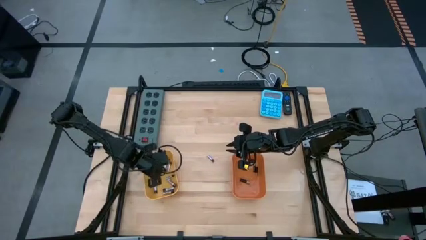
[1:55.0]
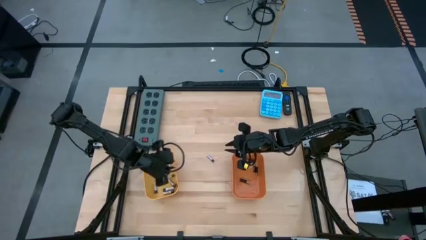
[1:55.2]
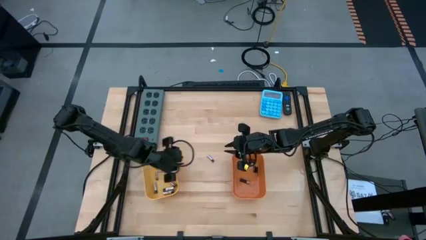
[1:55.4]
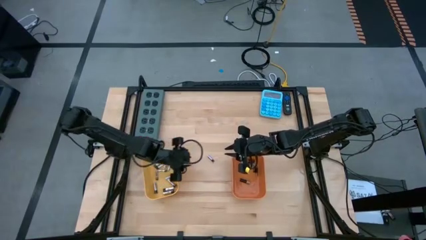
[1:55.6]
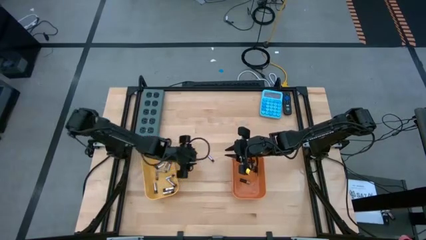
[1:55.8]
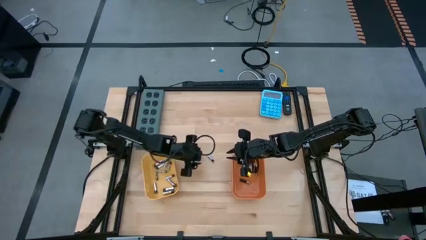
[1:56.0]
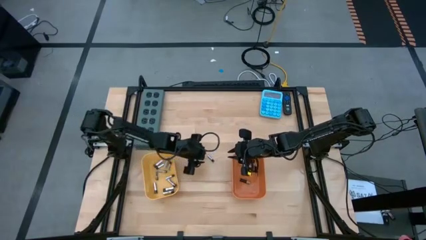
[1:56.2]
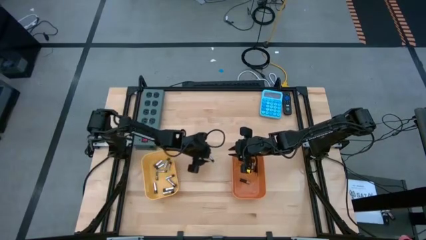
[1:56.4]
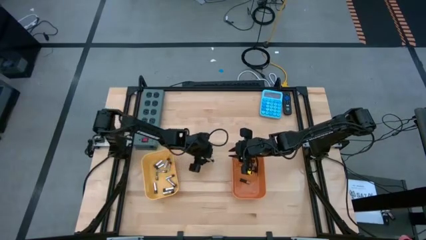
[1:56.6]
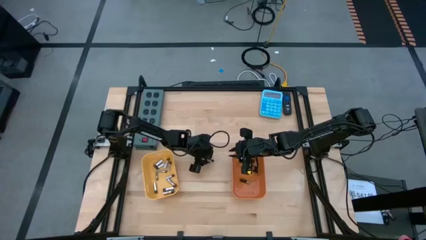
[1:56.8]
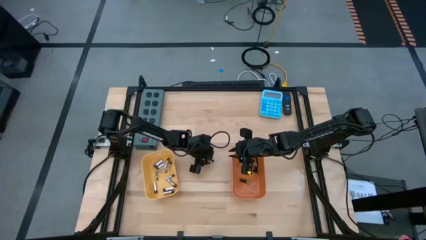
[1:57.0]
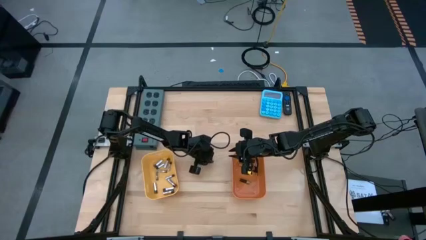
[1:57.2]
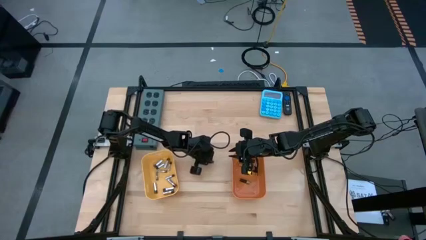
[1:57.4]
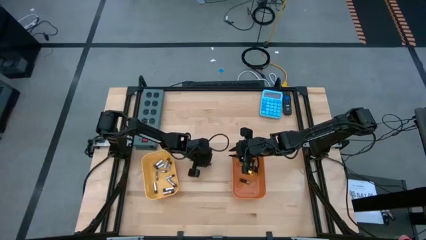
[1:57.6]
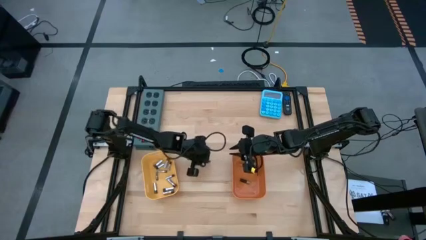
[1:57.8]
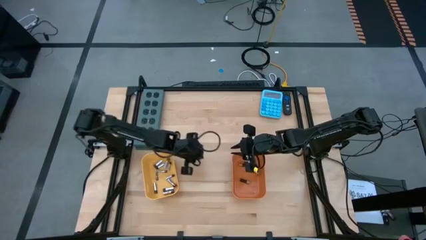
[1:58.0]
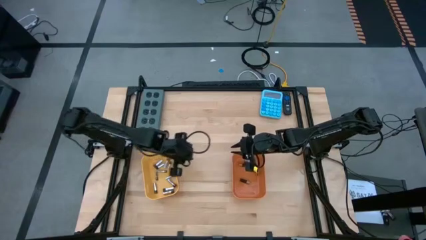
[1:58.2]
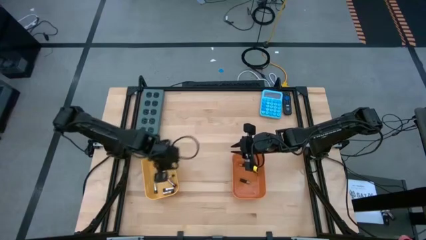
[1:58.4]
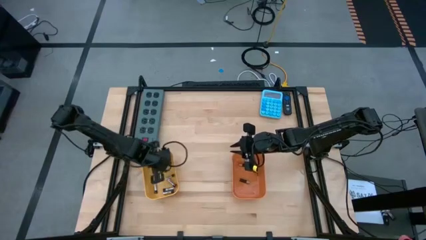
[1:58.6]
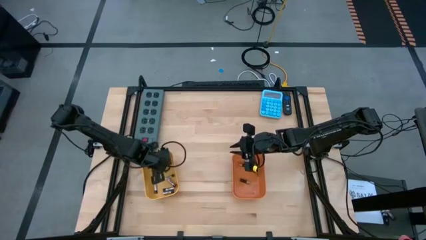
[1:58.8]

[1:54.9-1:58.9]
Task: Sort batteries
Put the silver battery into the yellow bin

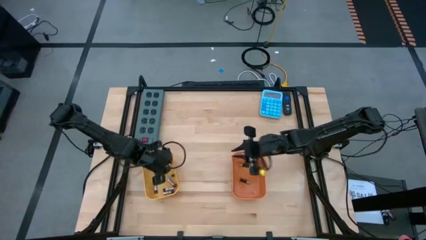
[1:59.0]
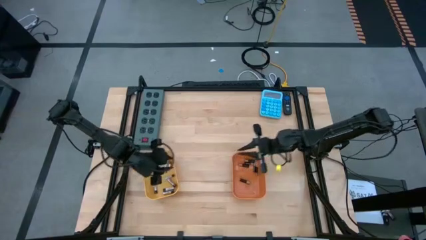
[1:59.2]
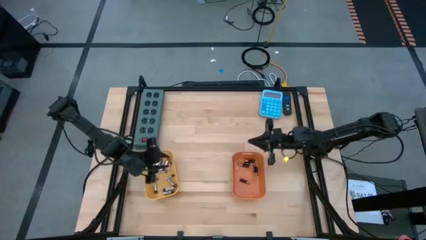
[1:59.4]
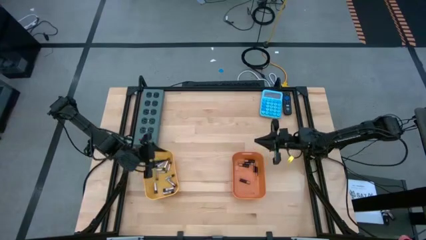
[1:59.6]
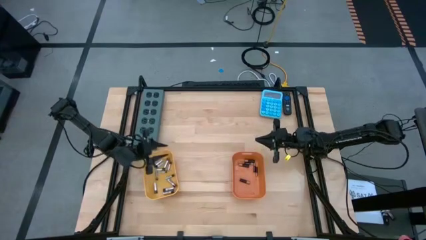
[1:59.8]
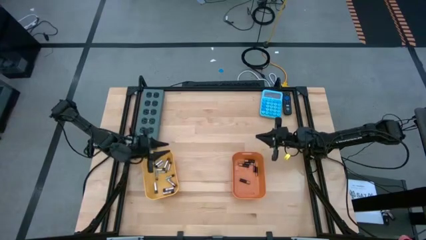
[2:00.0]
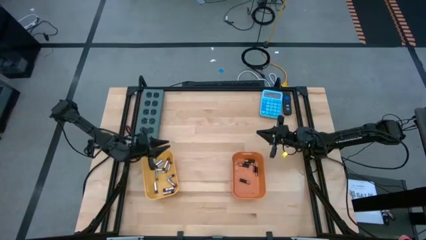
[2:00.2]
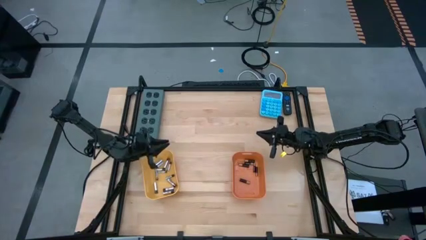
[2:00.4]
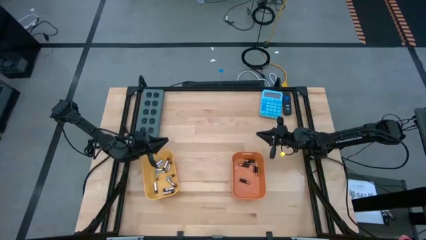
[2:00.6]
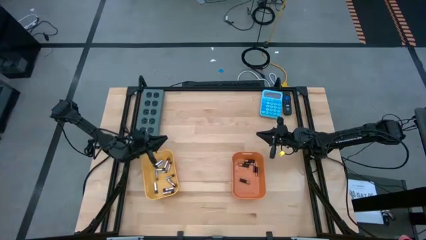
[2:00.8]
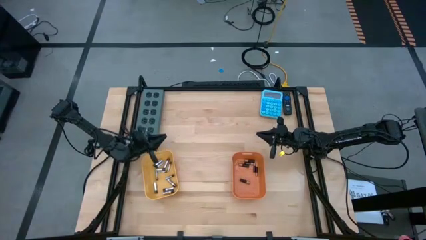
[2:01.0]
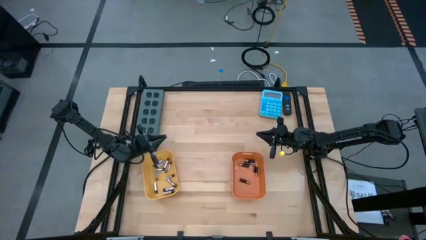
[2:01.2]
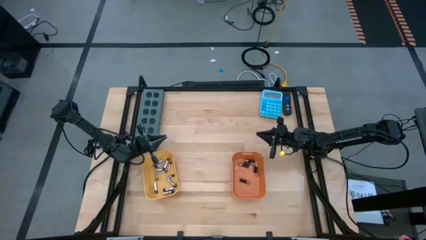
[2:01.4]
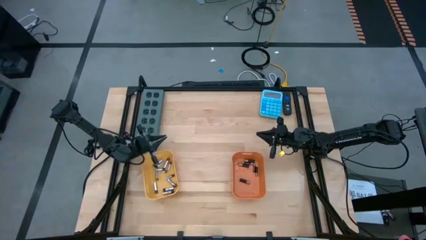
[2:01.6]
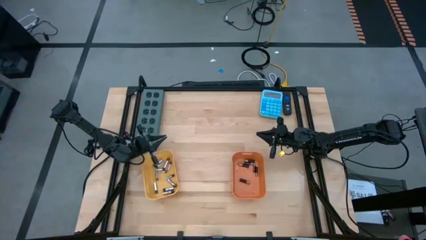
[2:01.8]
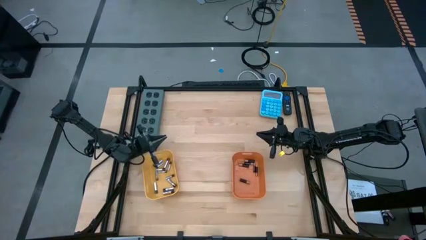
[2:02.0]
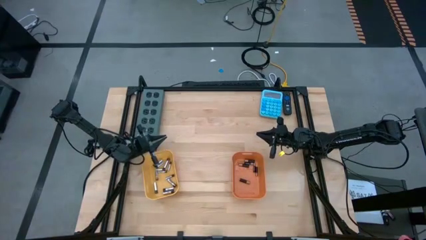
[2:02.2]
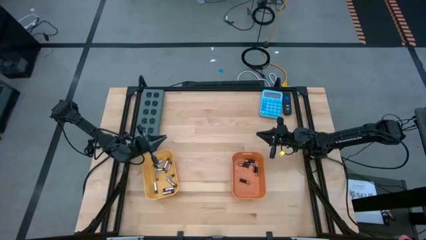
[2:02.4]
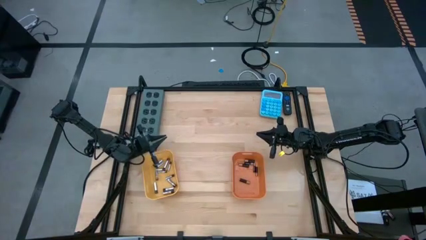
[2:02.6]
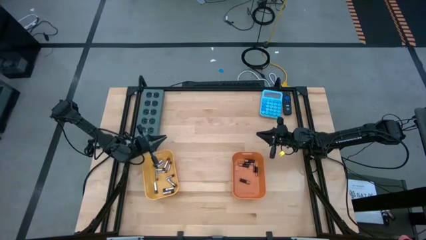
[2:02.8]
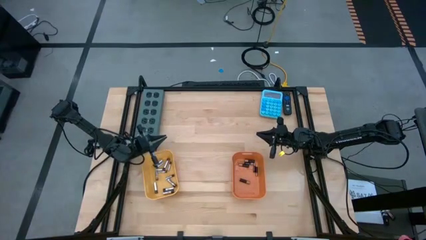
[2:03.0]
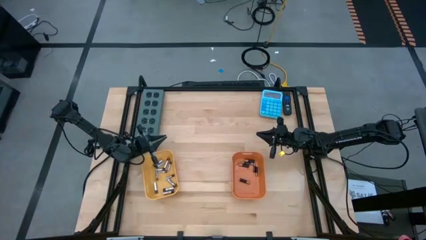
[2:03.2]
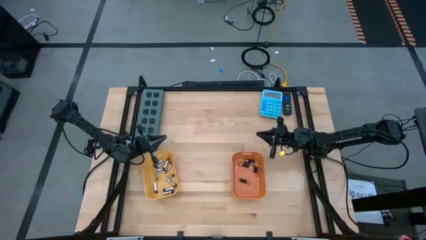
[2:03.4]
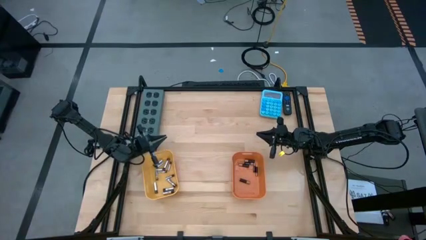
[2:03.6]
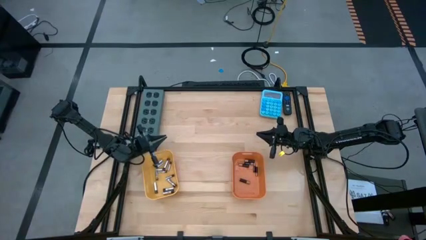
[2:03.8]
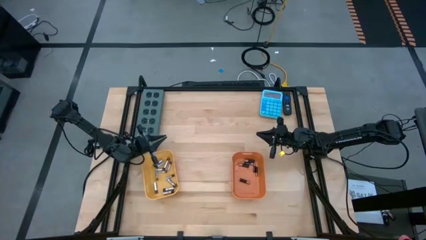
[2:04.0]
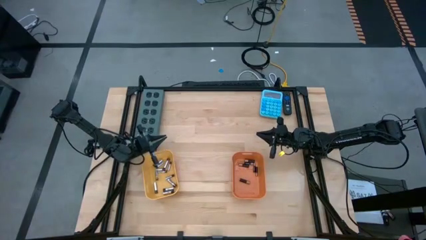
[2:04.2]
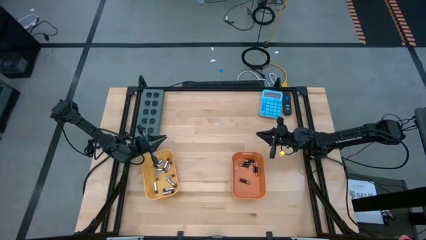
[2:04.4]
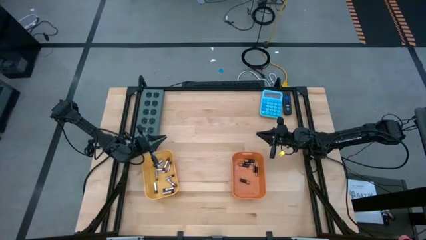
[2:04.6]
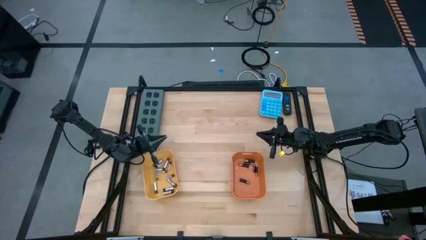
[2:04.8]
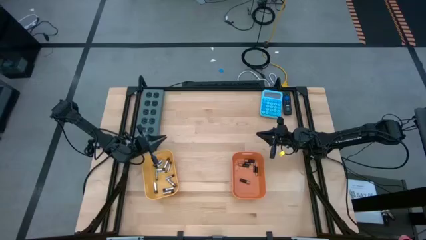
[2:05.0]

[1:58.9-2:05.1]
Return to Home Position
